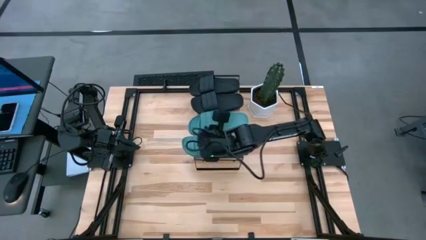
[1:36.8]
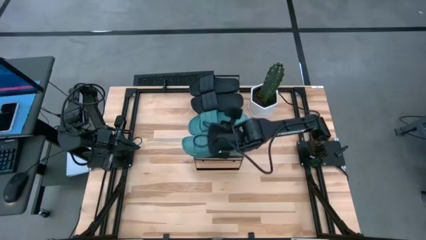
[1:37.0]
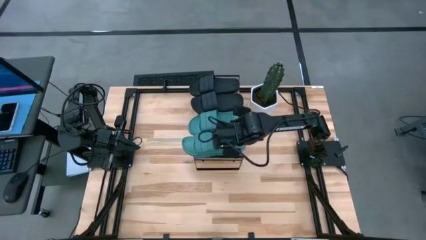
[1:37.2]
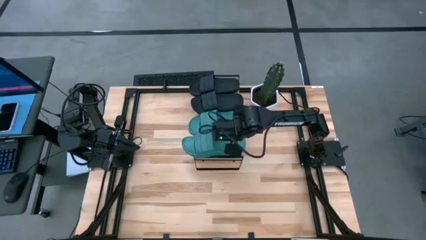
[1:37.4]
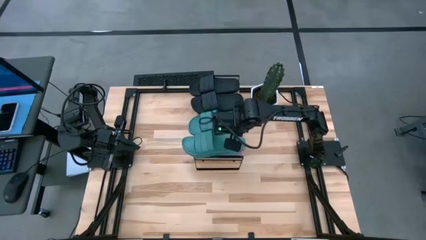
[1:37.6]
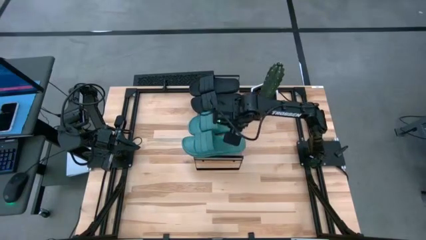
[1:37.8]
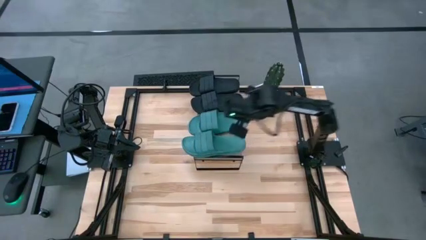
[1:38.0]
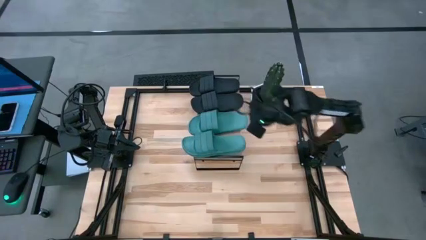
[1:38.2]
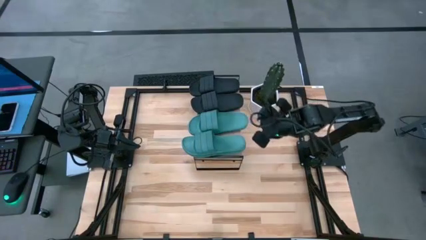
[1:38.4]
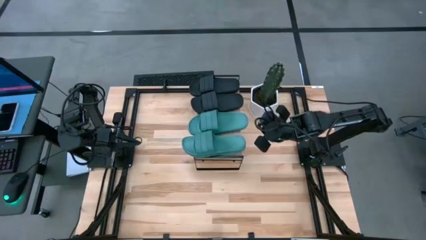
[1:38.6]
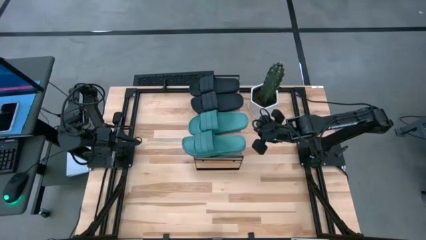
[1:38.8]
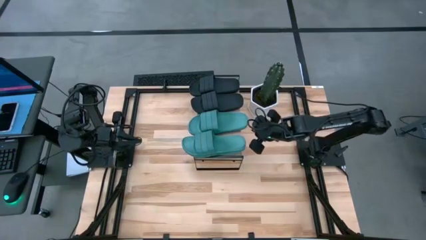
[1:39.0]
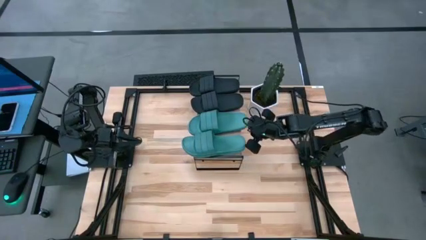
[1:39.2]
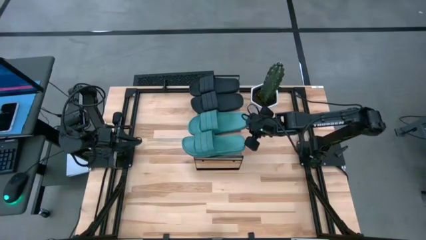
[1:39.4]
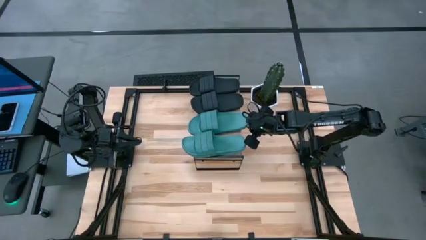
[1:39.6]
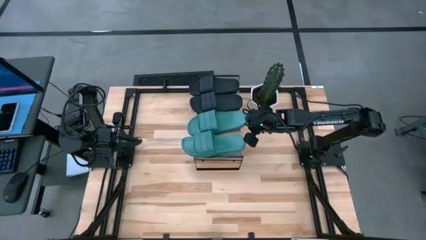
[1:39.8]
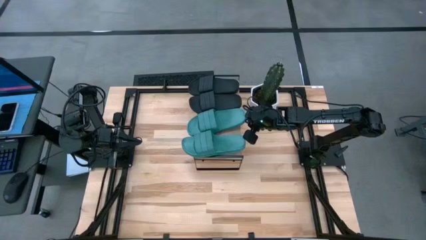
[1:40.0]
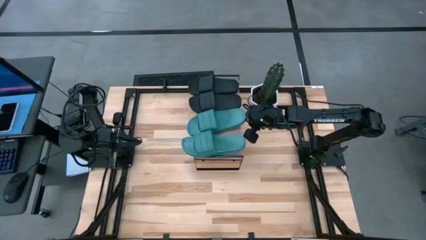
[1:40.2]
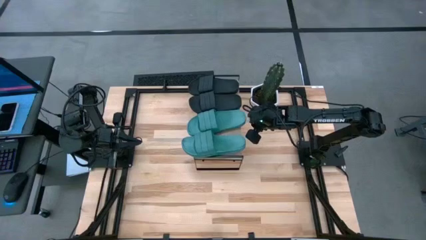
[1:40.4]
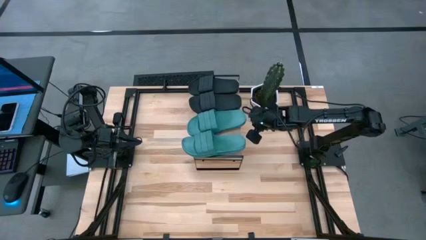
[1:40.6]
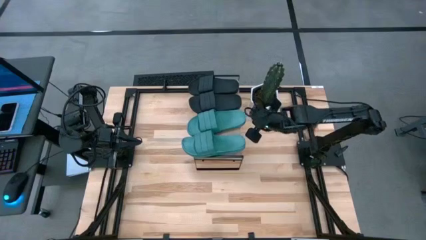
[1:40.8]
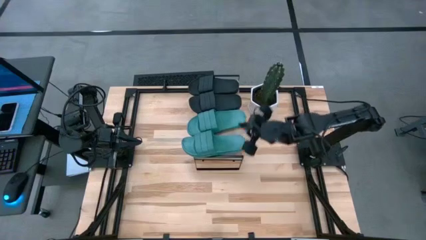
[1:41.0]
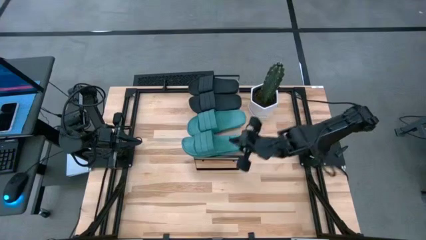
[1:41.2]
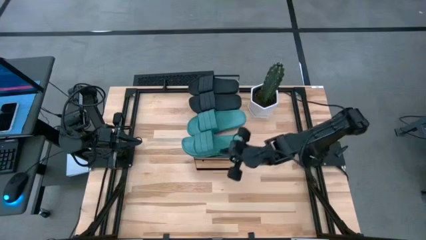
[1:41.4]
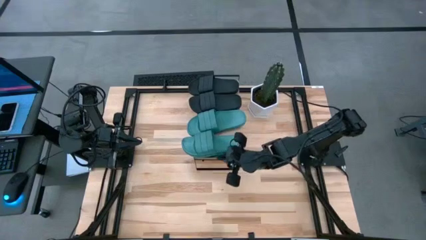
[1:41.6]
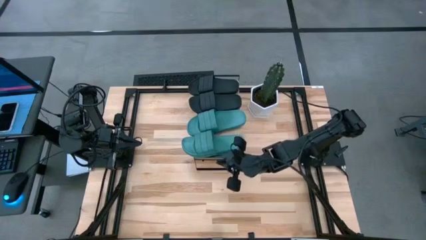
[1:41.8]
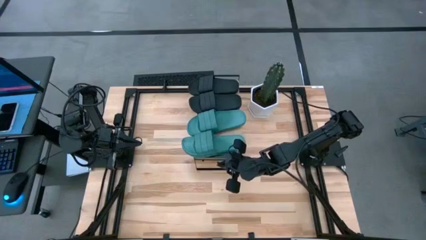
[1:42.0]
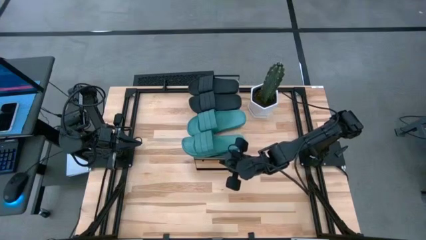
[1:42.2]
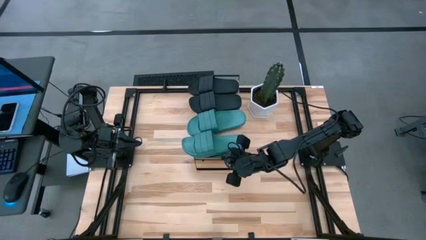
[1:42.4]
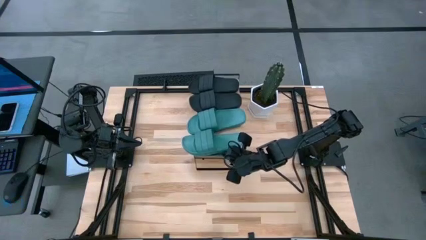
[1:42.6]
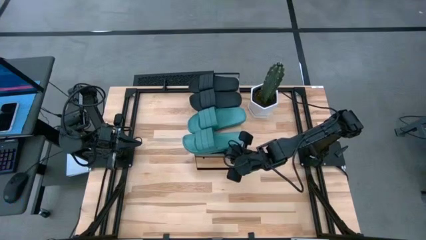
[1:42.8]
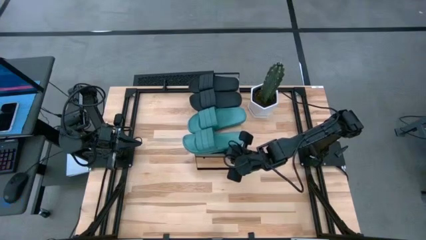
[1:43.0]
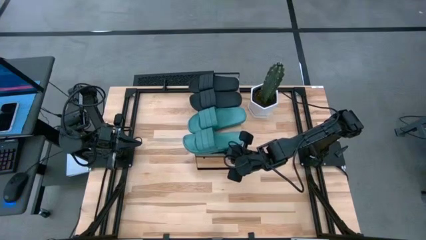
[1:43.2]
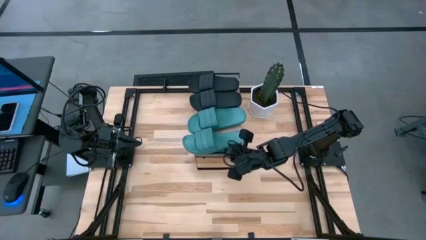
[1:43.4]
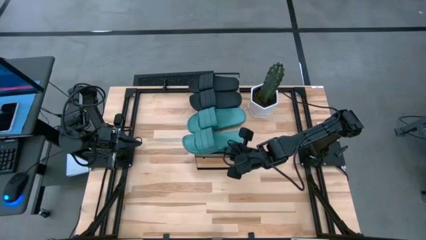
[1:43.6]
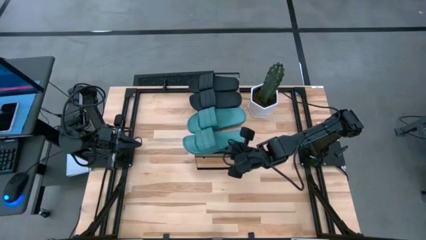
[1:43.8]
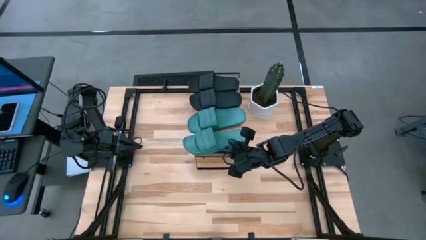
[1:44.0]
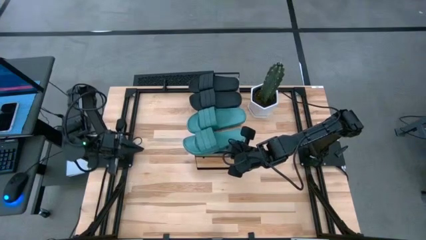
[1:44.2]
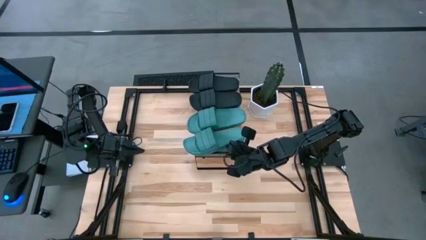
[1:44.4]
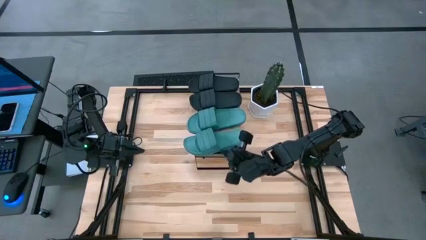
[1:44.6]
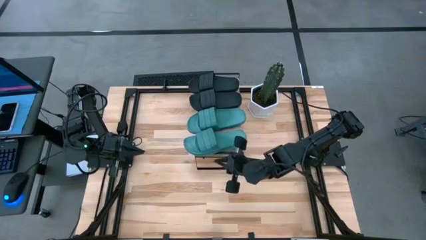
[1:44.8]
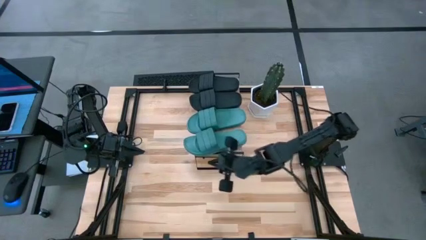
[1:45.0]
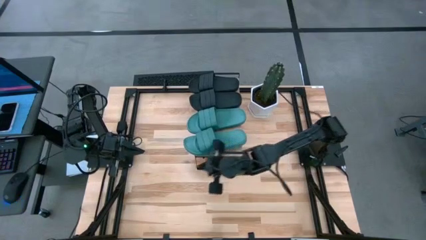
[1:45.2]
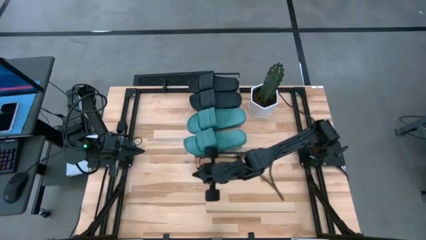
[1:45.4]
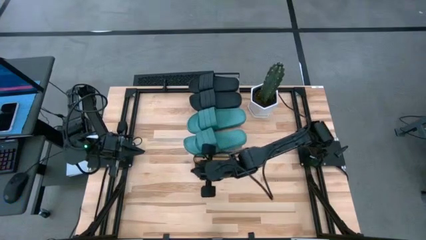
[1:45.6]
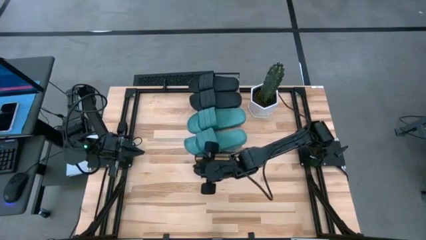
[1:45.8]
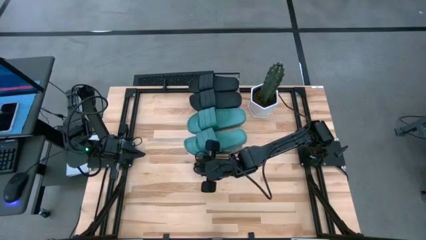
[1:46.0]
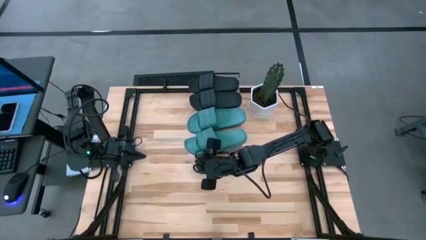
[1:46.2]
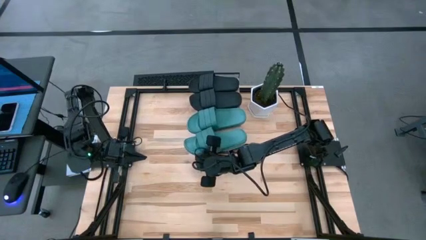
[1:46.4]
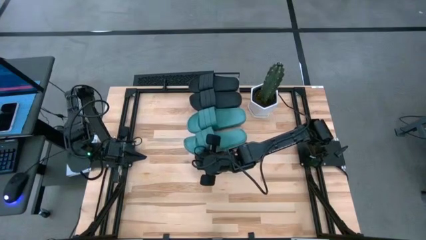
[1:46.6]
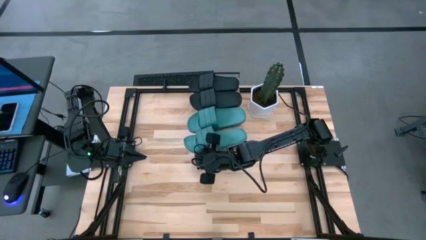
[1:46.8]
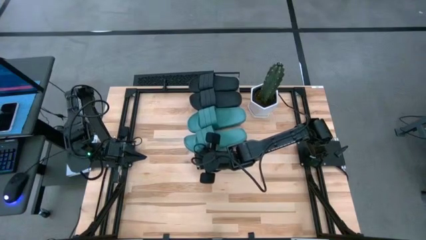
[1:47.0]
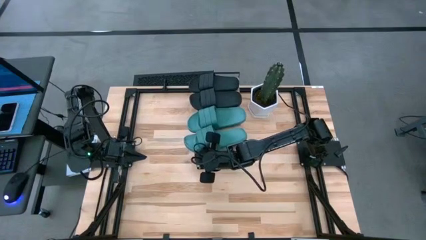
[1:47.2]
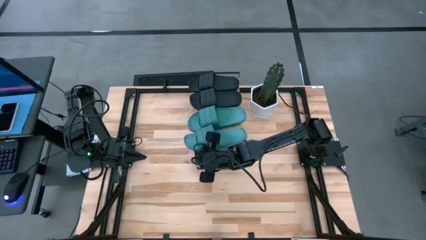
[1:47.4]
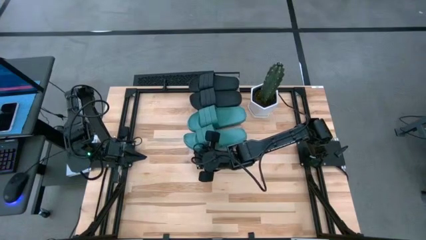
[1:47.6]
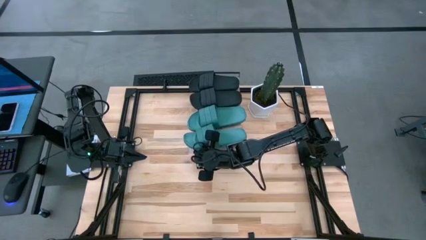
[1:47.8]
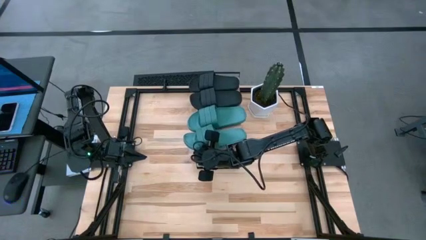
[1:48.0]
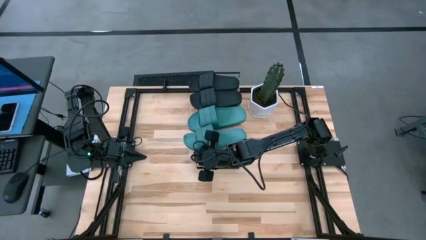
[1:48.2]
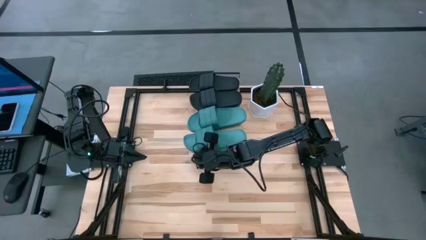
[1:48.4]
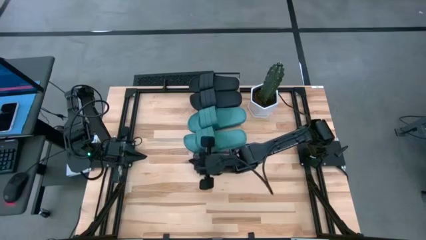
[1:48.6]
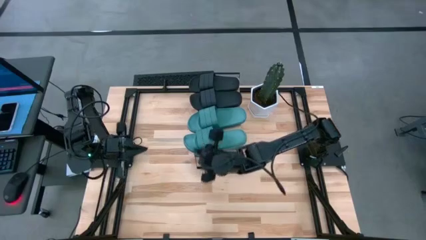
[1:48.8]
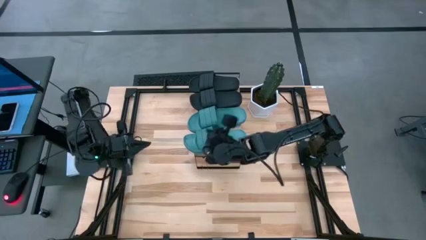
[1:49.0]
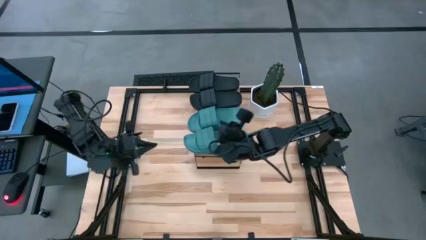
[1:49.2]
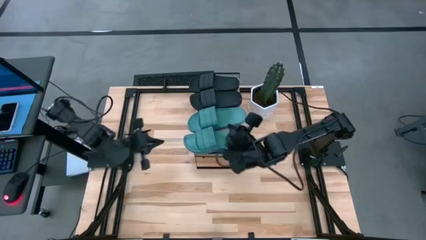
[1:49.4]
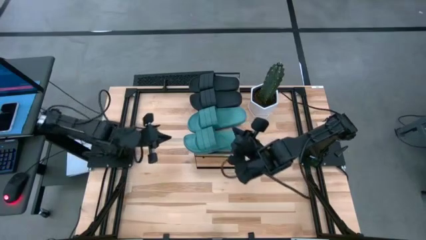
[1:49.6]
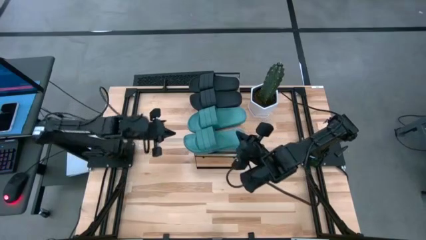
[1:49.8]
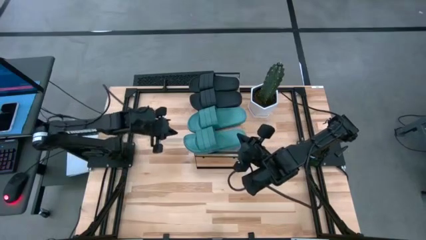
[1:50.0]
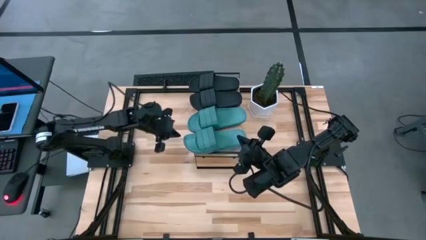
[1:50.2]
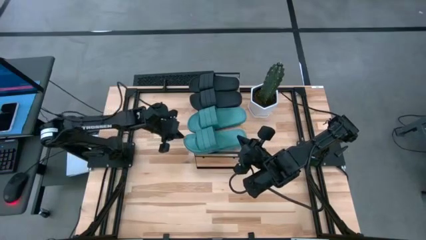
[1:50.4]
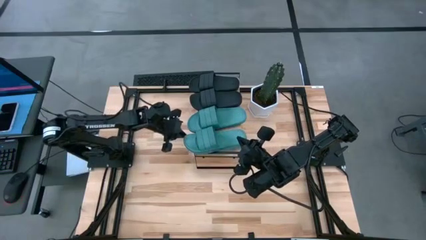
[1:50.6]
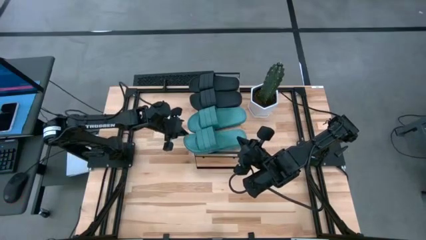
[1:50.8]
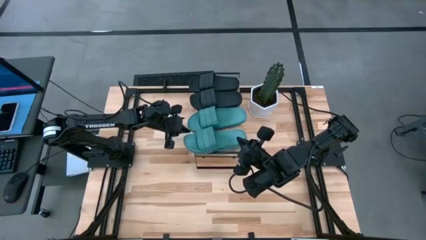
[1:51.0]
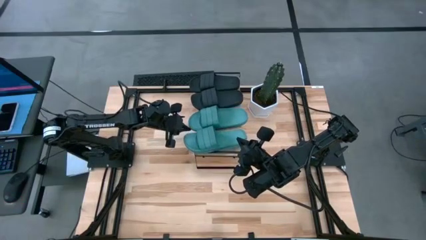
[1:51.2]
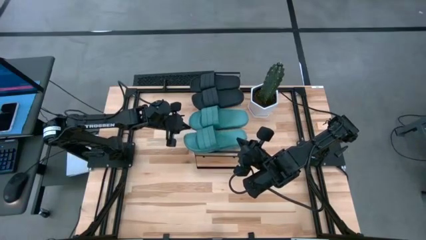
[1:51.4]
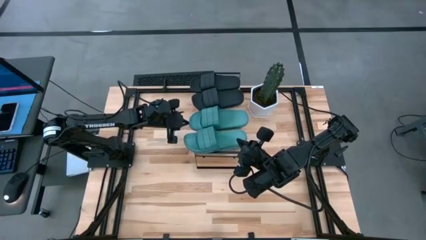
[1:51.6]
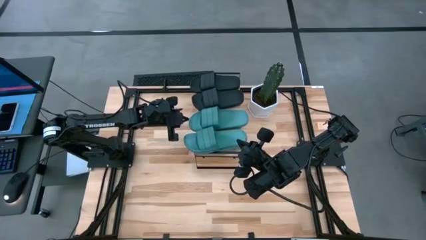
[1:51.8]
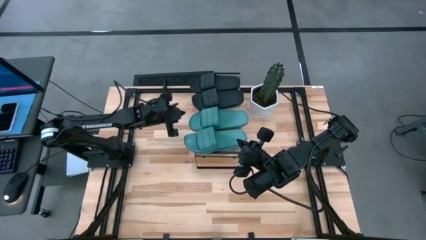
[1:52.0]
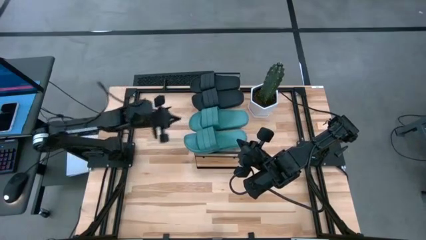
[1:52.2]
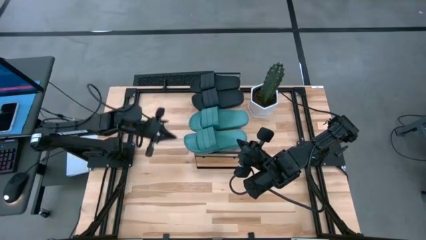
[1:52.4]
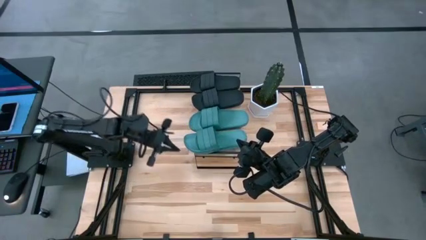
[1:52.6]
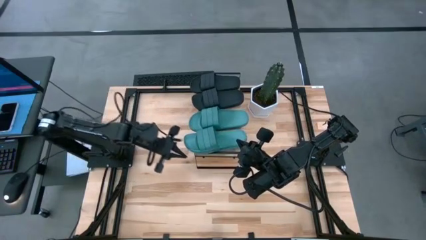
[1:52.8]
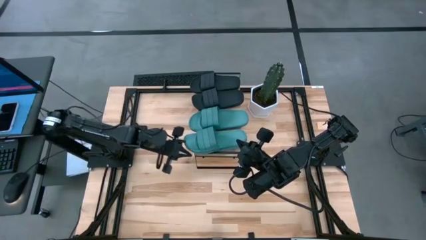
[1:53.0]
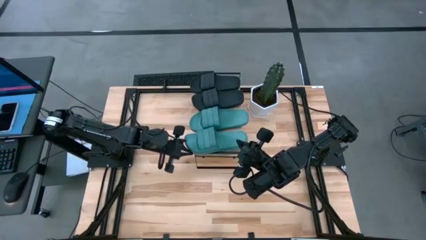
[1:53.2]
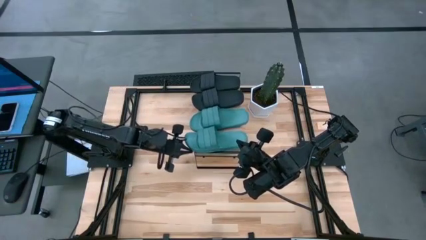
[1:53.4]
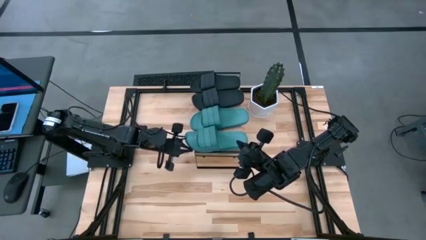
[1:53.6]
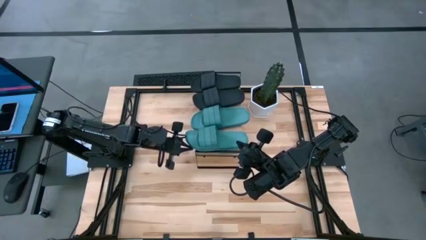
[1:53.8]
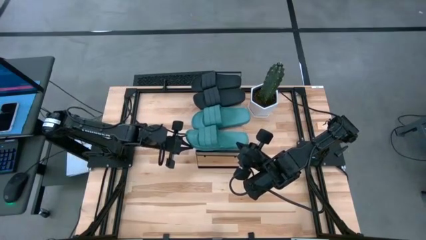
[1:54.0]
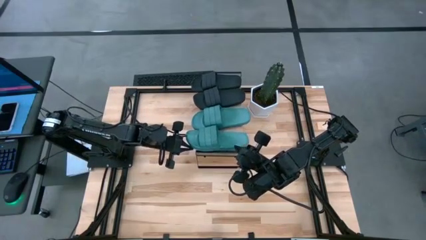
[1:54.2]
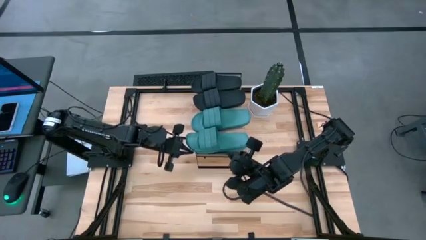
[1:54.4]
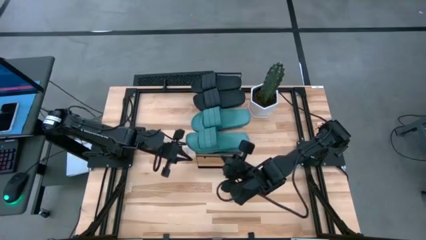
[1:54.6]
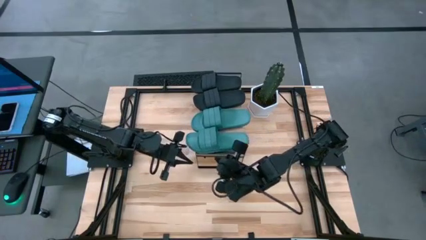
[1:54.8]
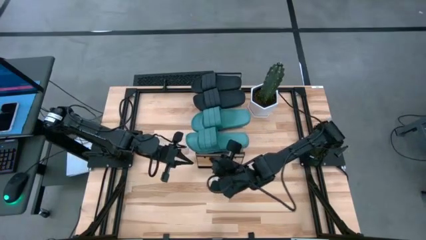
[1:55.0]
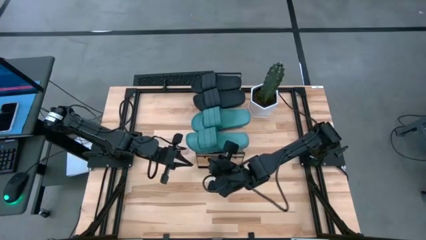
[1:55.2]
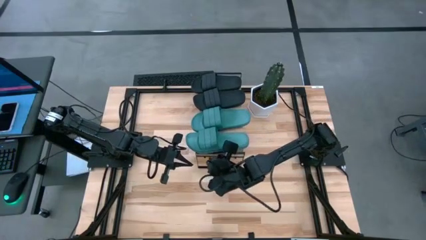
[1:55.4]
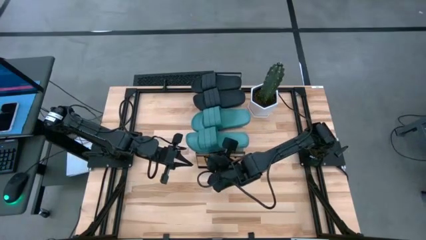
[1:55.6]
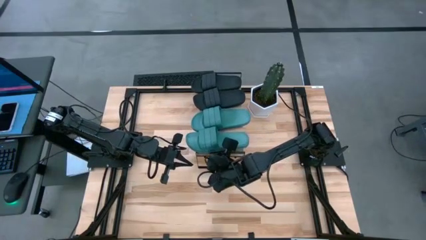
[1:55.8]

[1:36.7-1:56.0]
Task: Pick and place slides into the shelf
Adjust the black and green slippers
